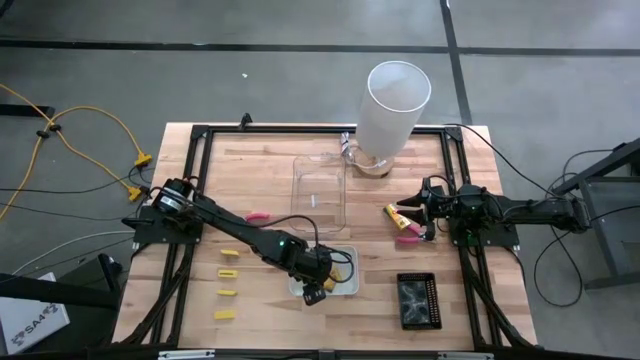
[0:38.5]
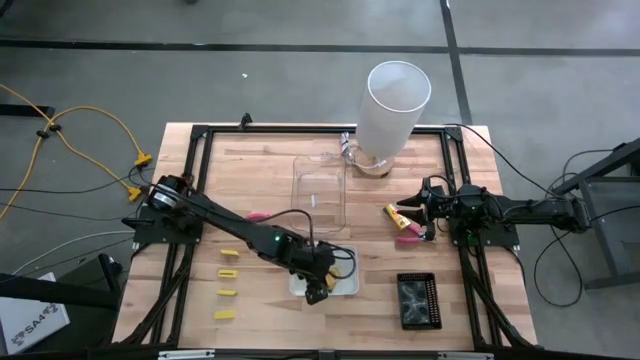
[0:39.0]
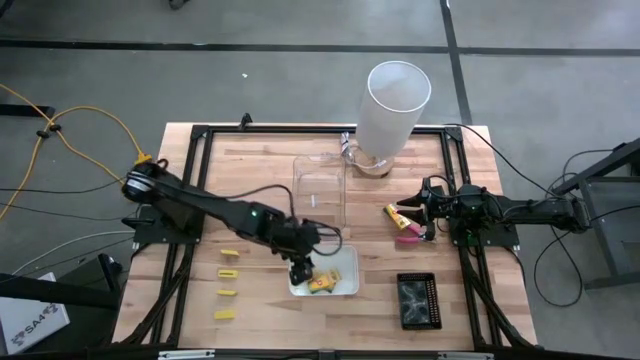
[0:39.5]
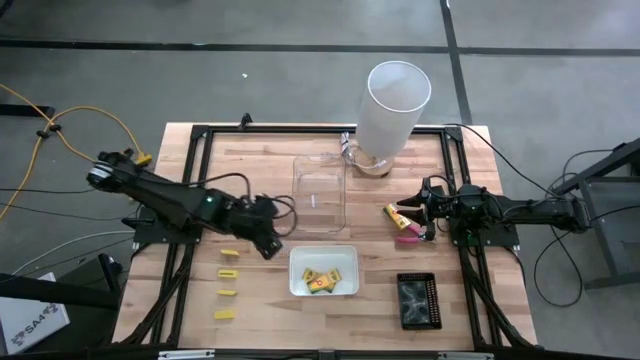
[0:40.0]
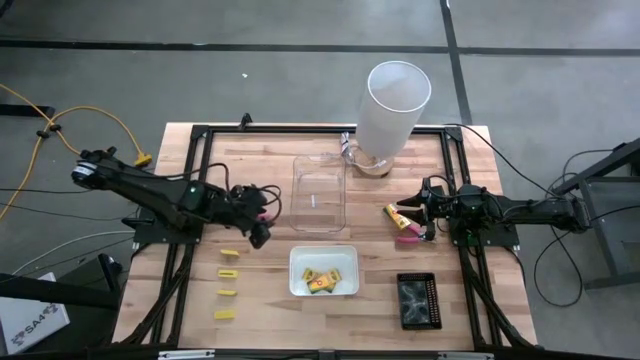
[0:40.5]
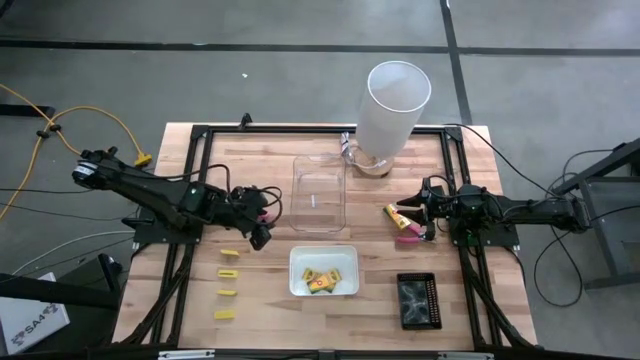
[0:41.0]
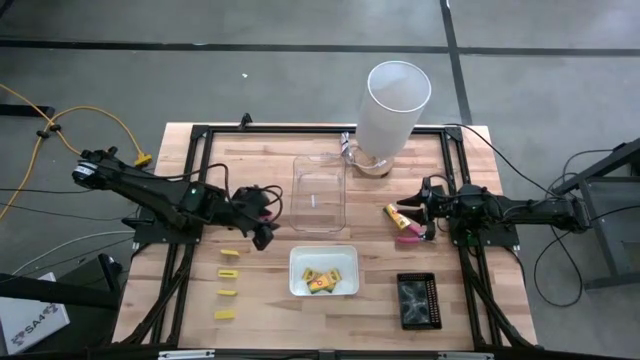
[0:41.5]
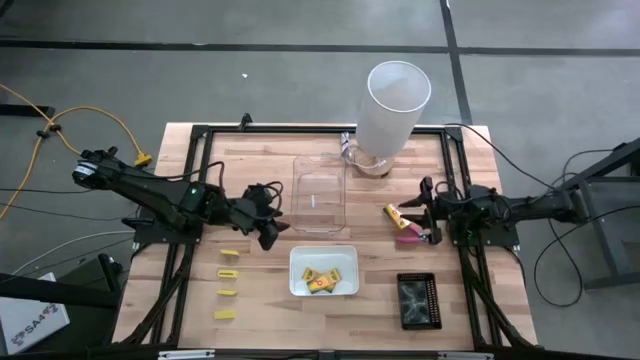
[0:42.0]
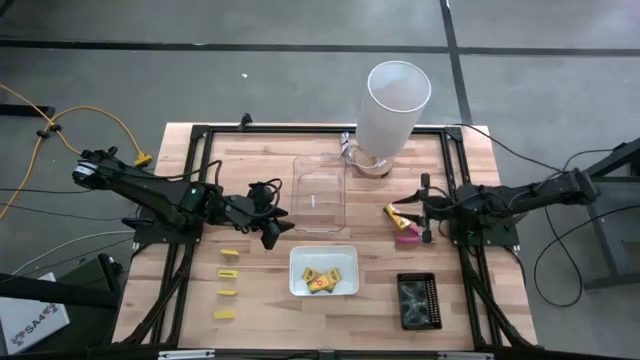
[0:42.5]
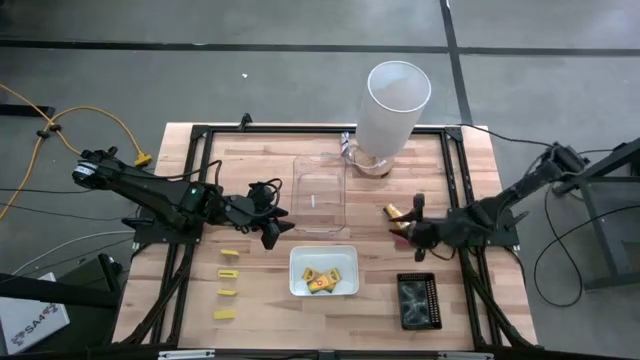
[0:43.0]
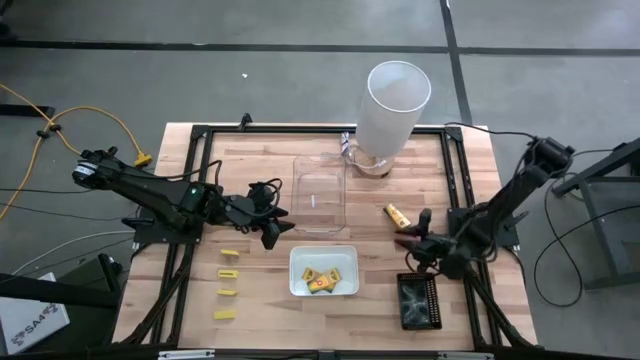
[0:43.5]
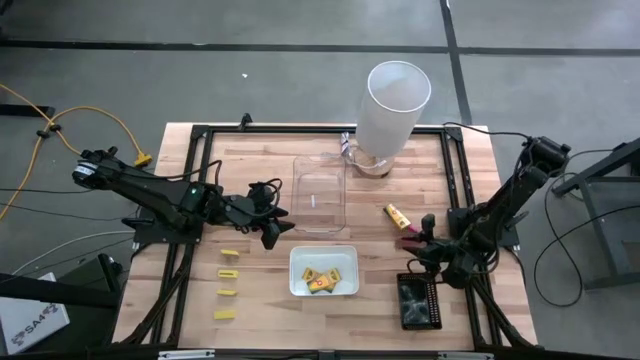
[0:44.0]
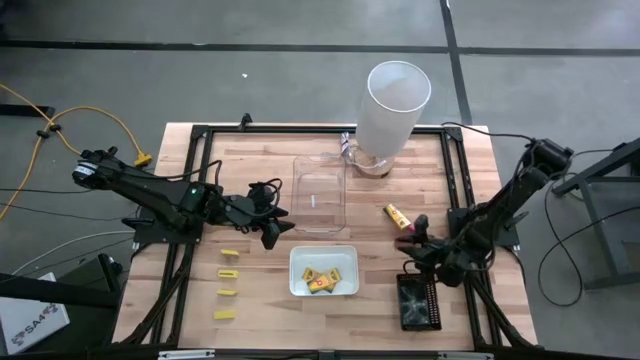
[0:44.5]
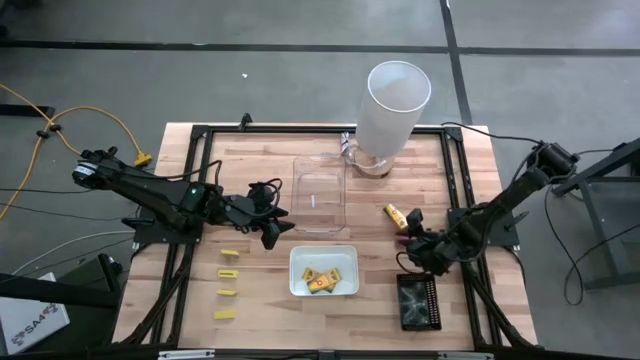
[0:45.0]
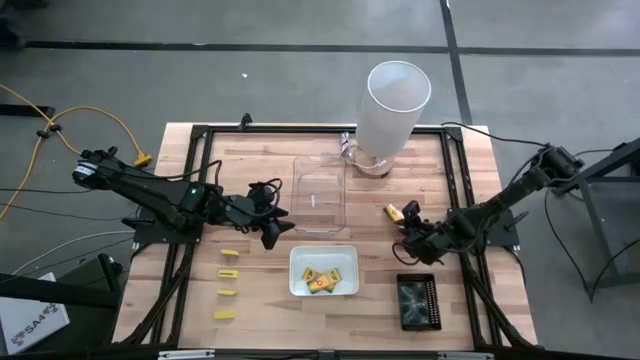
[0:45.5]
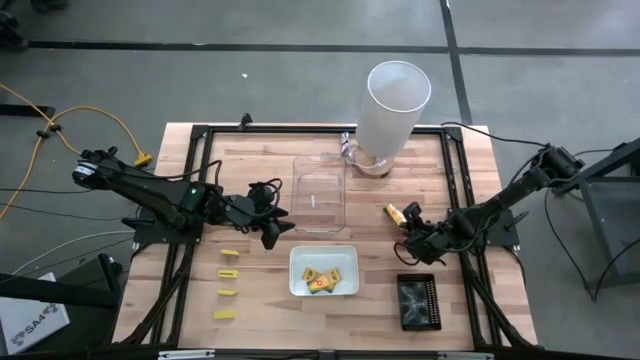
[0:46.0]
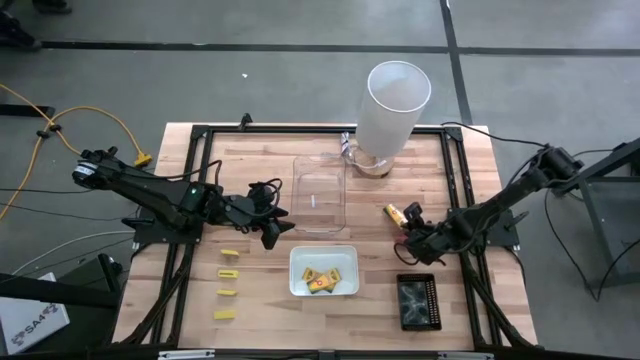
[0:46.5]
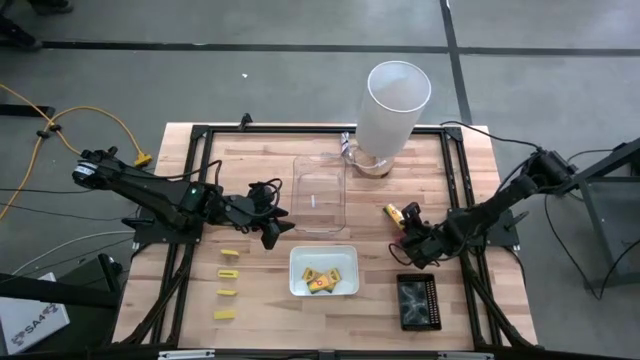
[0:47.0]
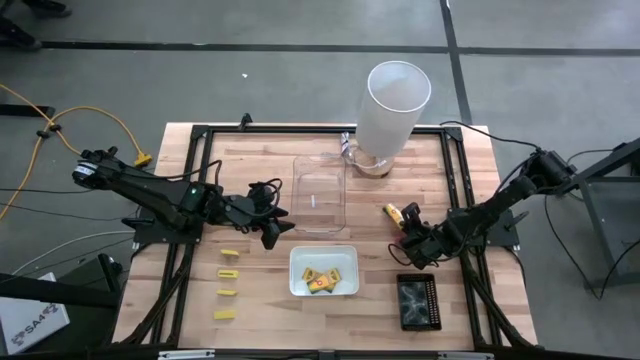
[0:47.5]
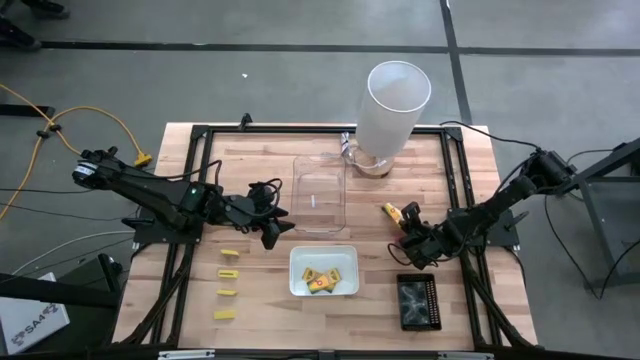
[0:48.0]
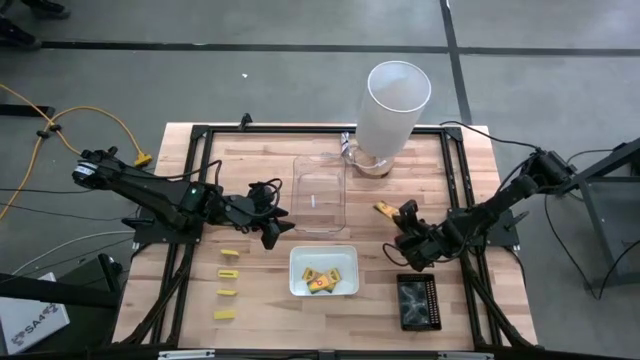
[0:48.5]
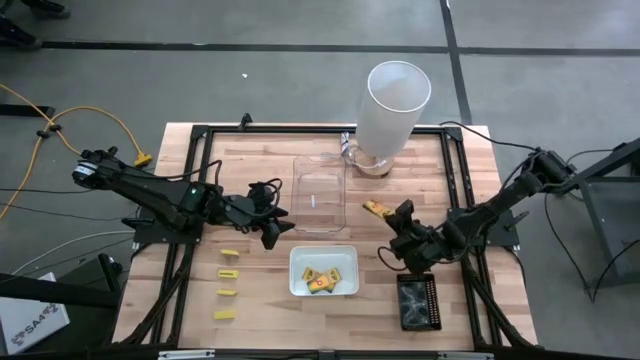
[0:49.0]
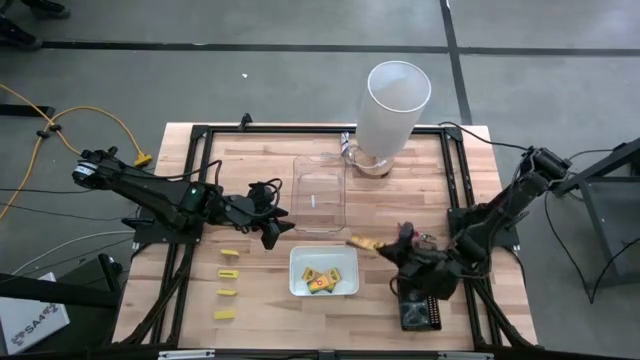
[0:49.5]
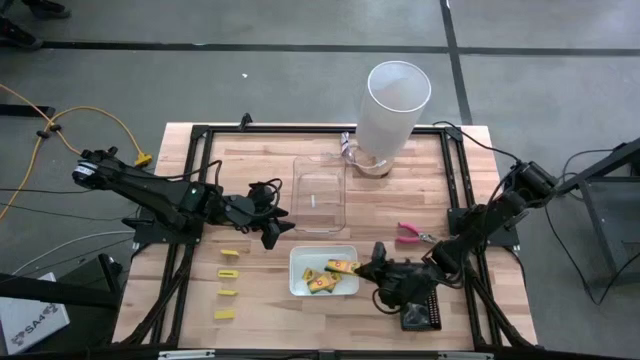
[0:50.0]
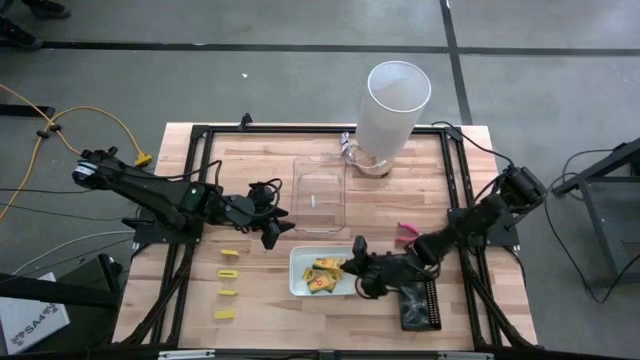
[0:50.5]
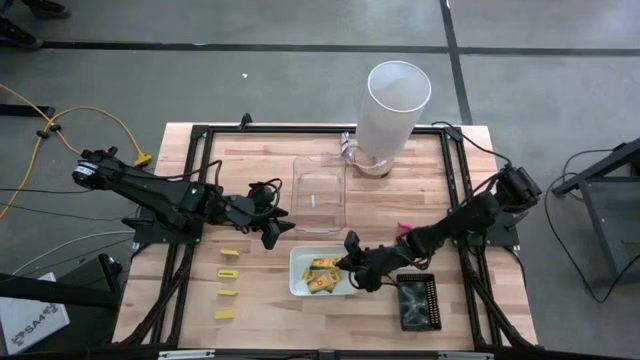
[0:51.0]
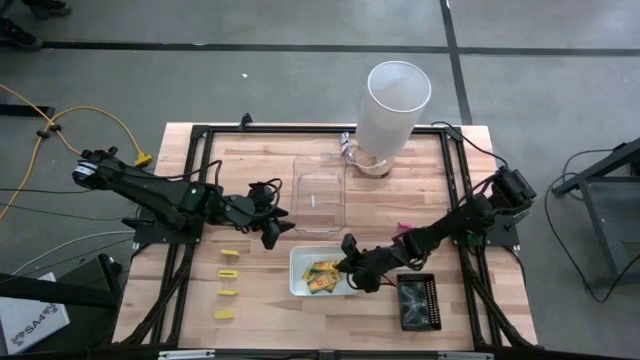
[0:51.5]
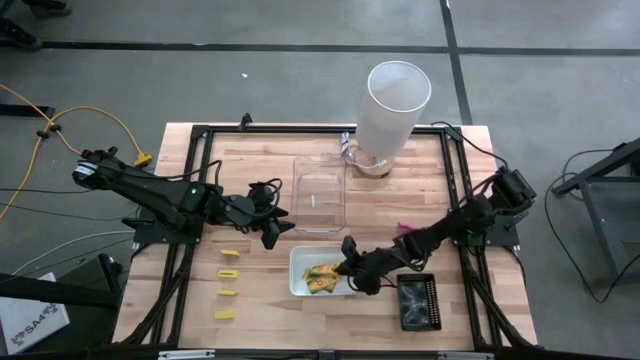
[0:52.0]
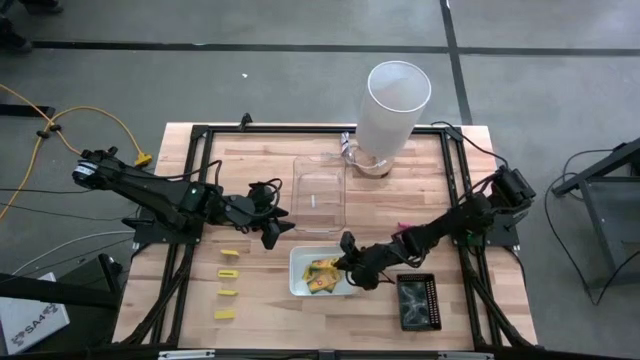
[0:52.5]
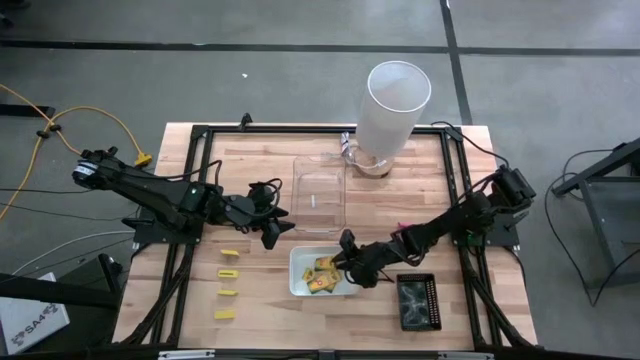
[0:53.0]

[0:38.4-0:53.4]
Task: Pick & Place School Supplies
Put the yellow crayon box into the white bin

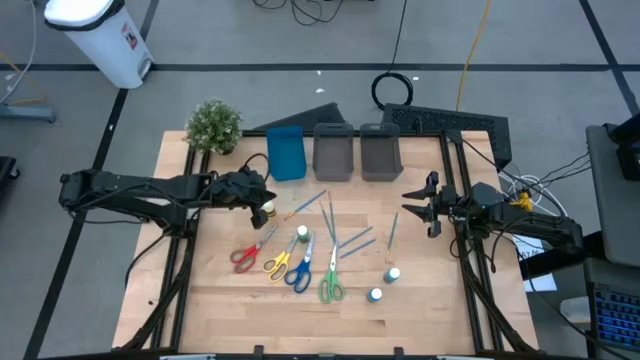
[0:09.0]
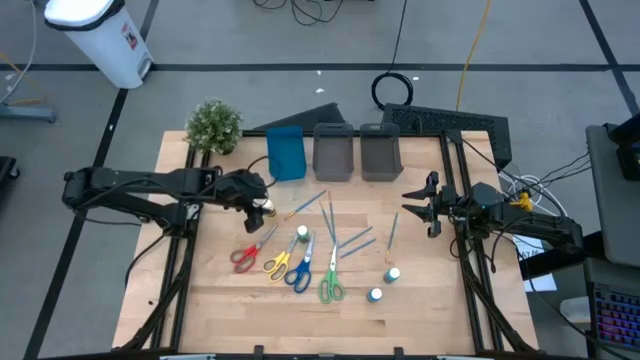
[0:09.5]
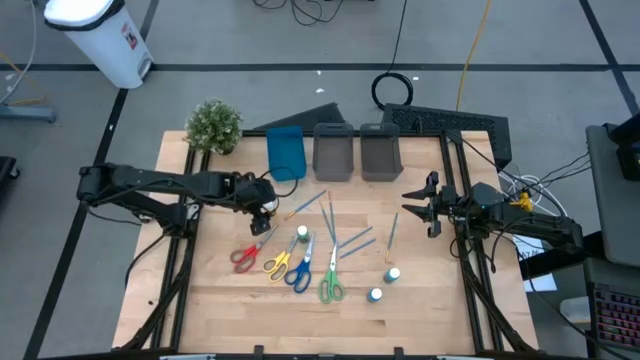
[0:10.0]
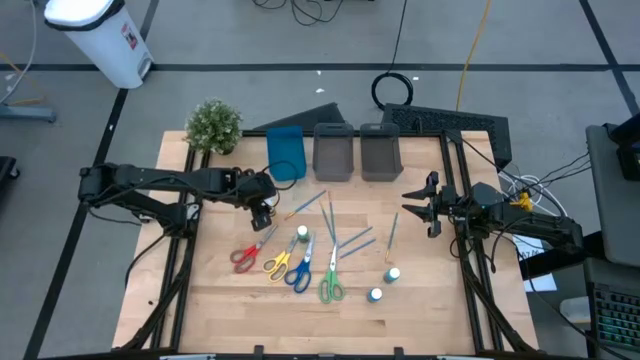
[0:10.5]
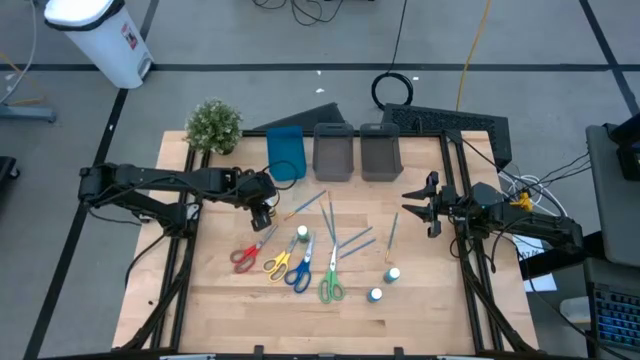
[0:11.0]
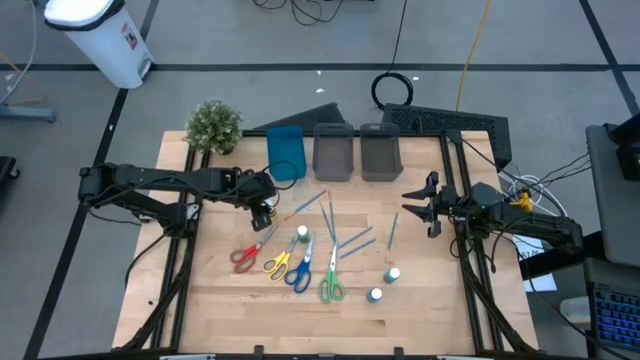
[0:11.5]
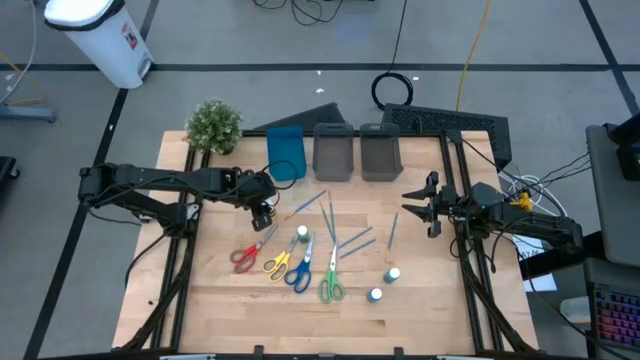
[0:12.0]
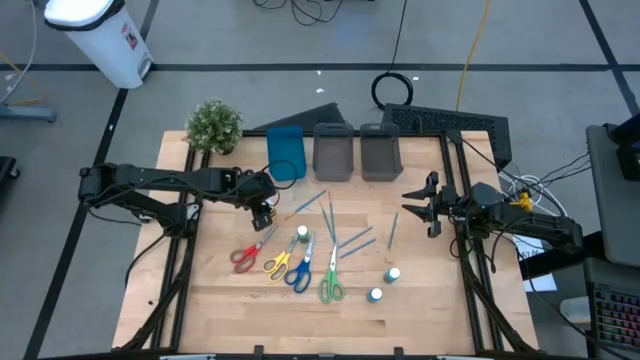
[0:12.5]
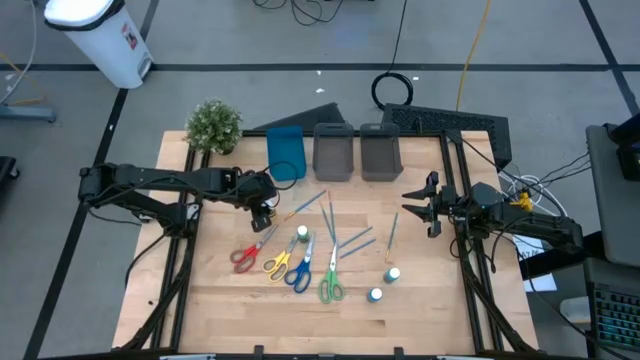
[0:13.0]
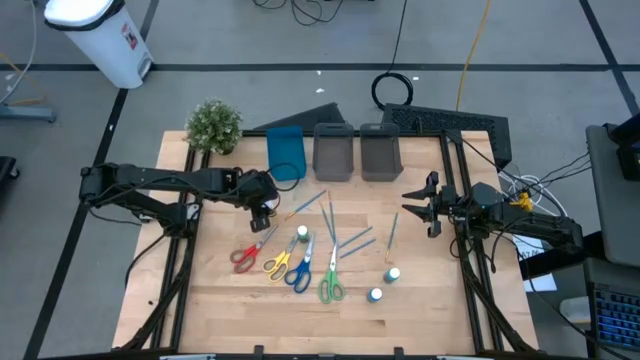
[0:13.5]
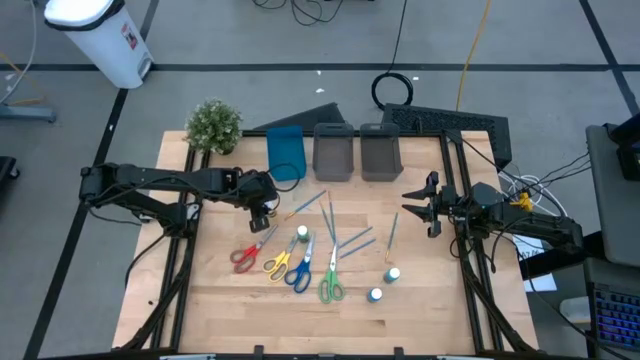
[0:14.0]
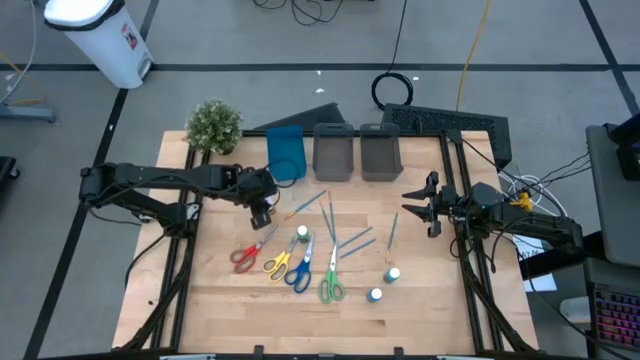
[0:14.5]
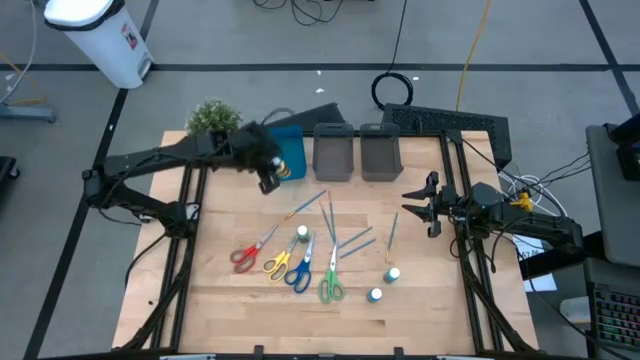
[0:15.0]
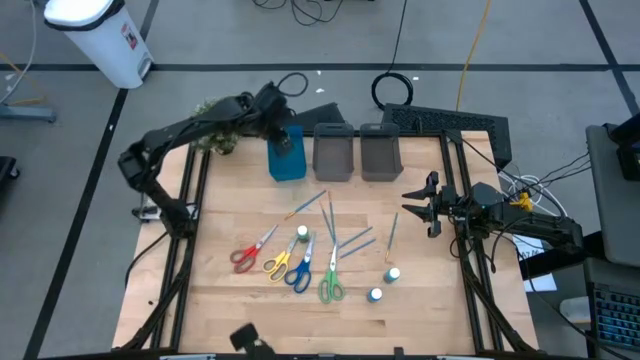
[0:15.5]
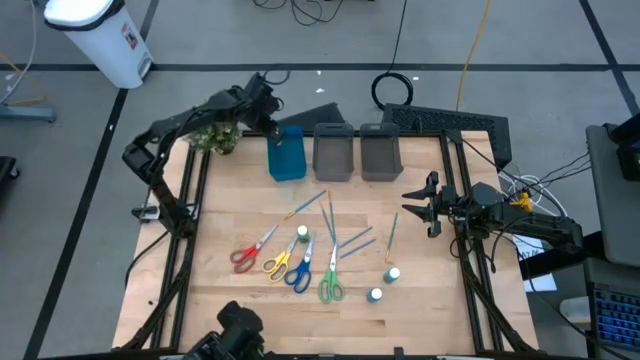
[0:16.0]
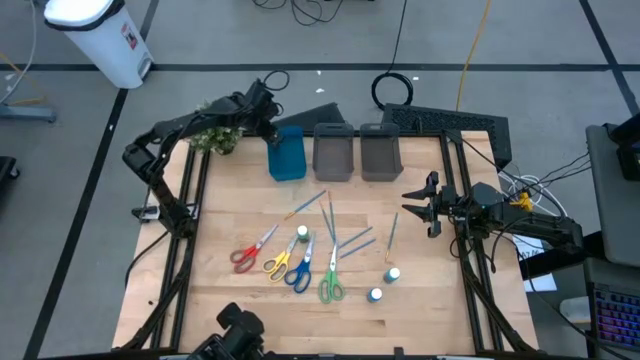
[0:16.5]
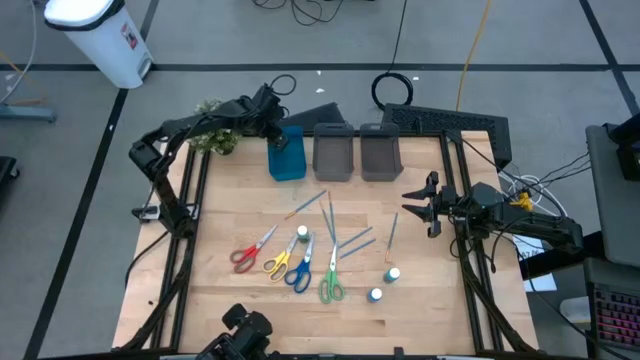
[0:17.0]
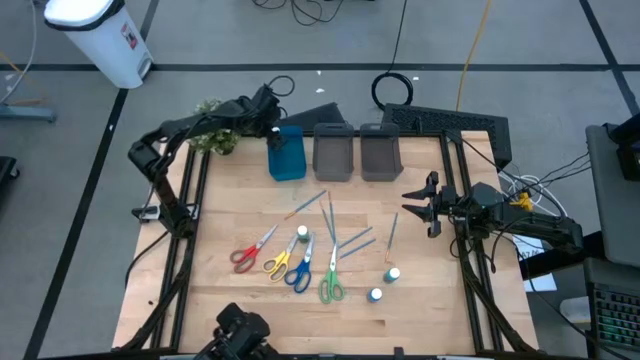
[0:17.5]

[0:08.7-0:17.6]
Task: Pick & Place Paint Supplies
Put the yellow paint into the blue bin
